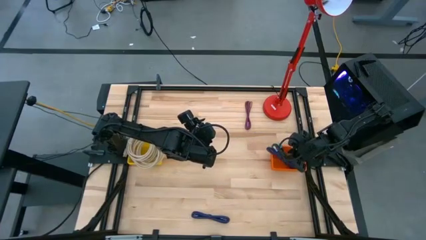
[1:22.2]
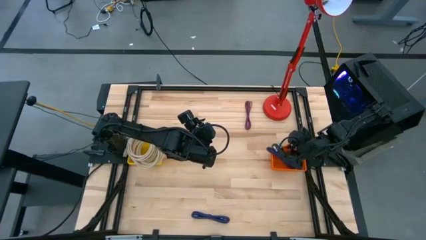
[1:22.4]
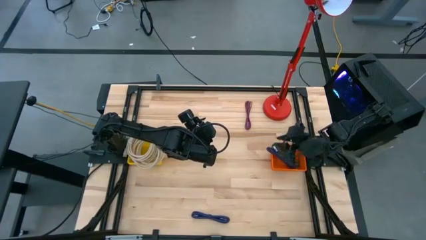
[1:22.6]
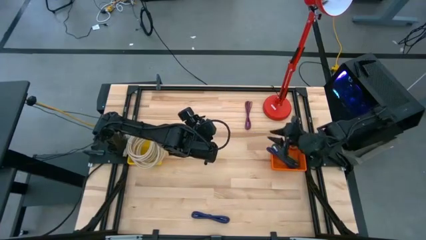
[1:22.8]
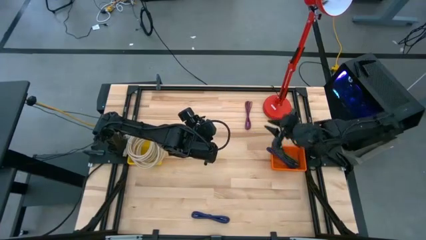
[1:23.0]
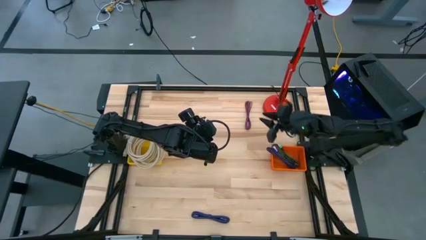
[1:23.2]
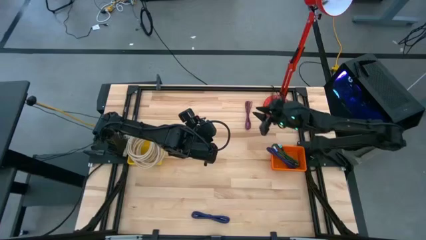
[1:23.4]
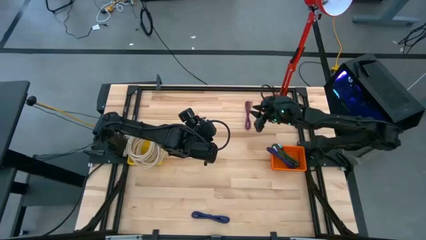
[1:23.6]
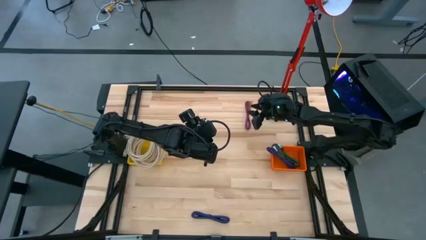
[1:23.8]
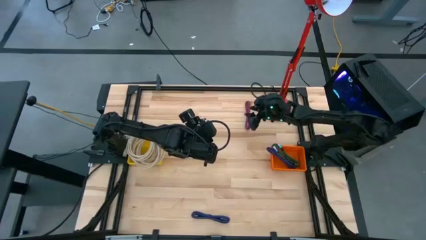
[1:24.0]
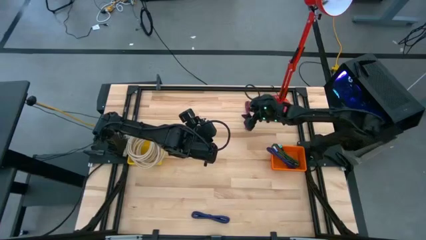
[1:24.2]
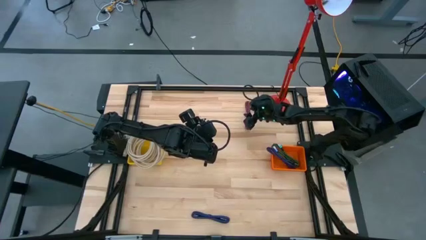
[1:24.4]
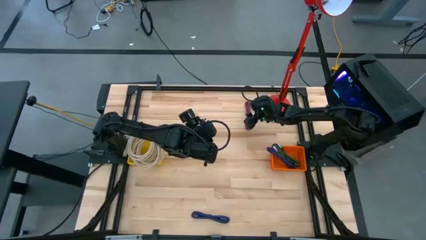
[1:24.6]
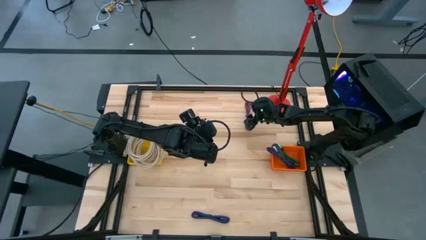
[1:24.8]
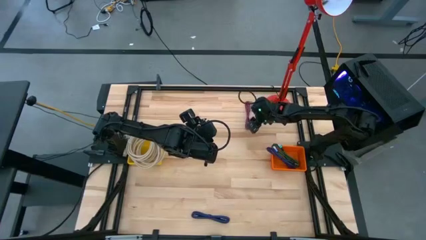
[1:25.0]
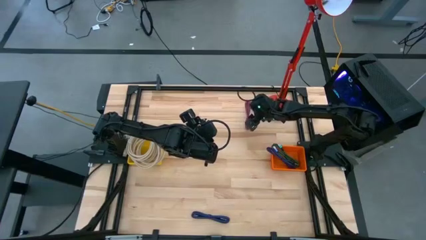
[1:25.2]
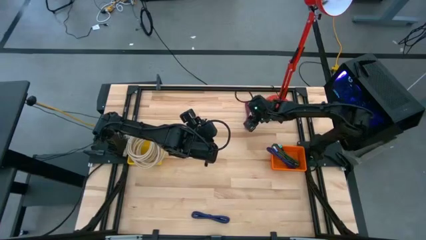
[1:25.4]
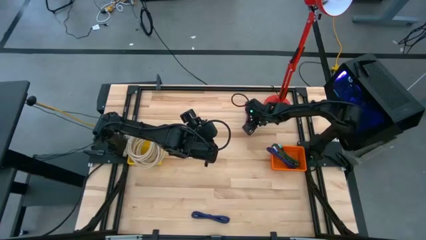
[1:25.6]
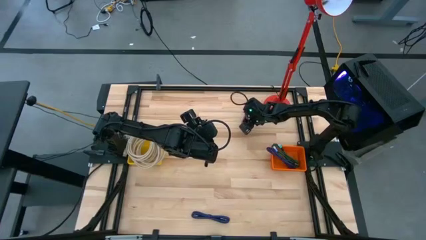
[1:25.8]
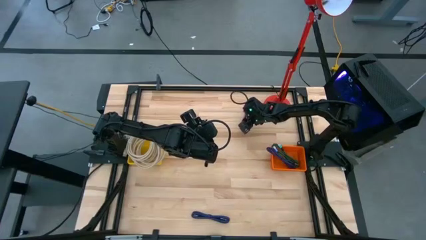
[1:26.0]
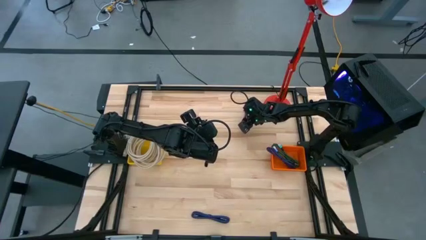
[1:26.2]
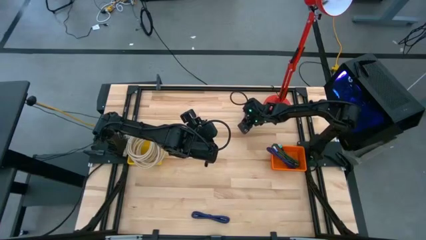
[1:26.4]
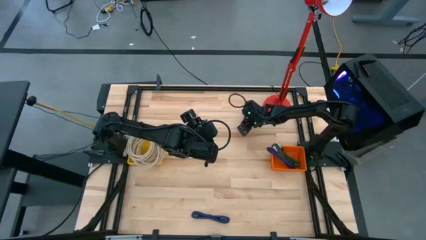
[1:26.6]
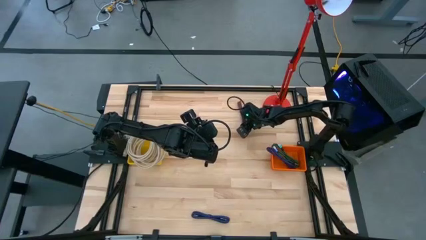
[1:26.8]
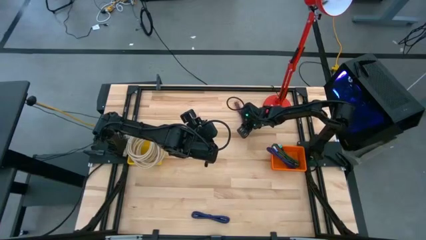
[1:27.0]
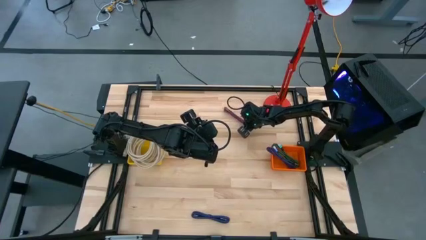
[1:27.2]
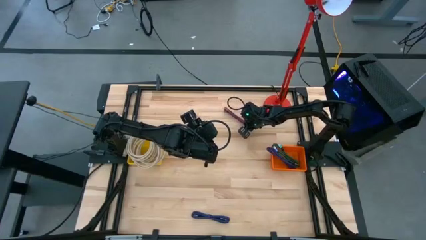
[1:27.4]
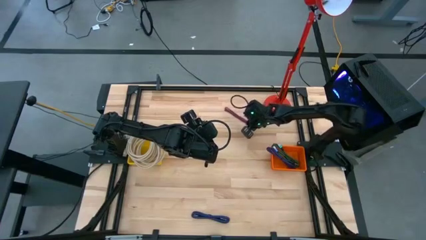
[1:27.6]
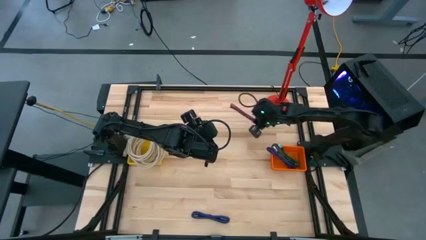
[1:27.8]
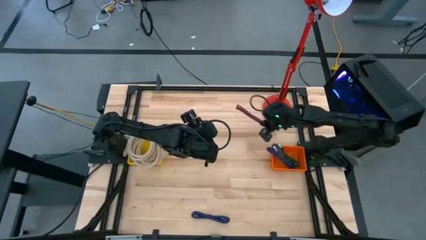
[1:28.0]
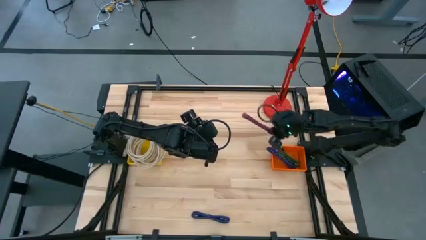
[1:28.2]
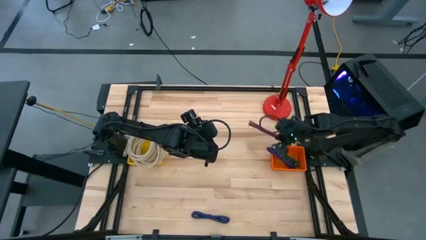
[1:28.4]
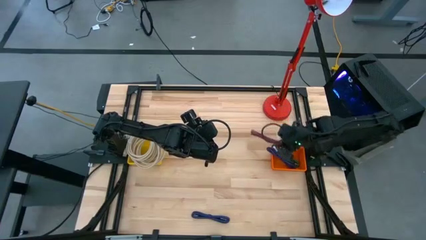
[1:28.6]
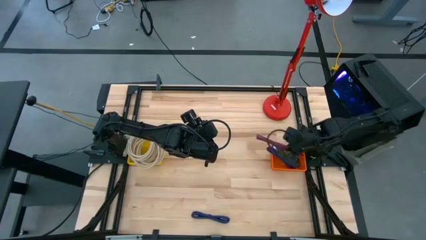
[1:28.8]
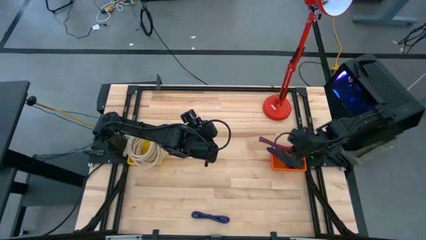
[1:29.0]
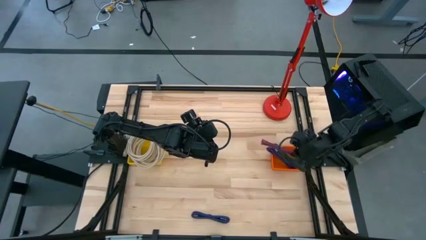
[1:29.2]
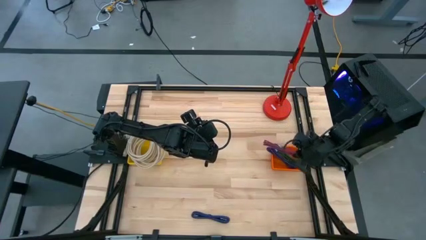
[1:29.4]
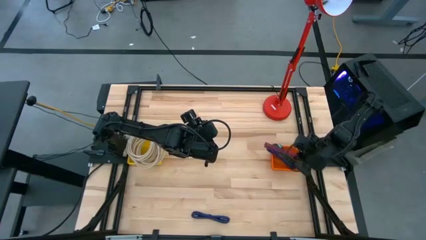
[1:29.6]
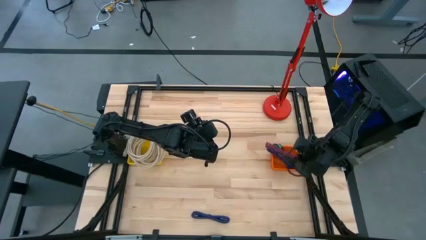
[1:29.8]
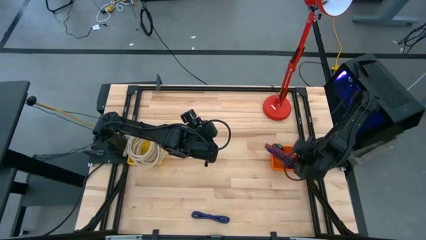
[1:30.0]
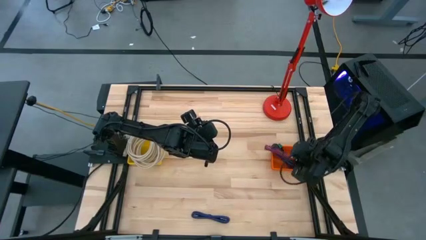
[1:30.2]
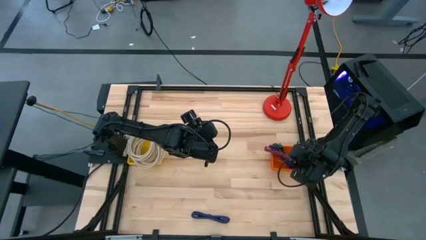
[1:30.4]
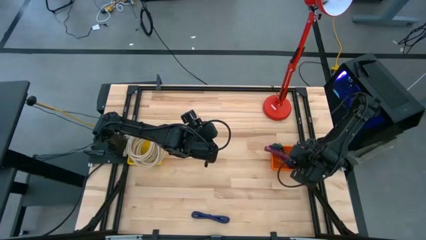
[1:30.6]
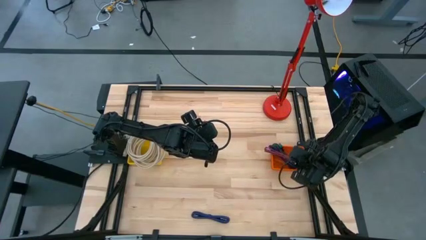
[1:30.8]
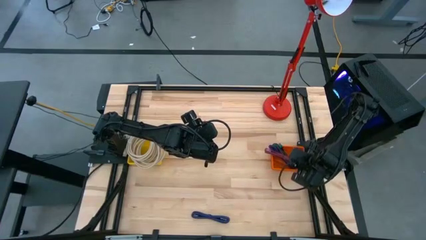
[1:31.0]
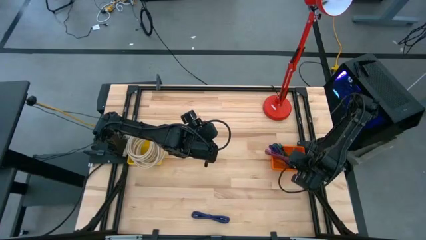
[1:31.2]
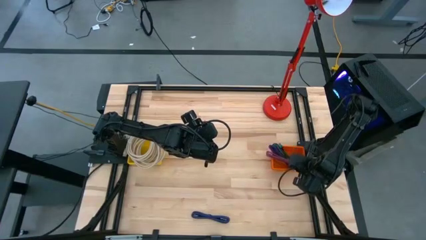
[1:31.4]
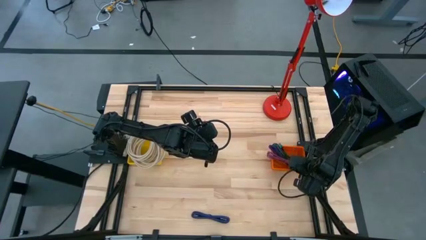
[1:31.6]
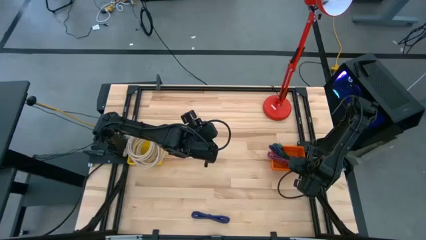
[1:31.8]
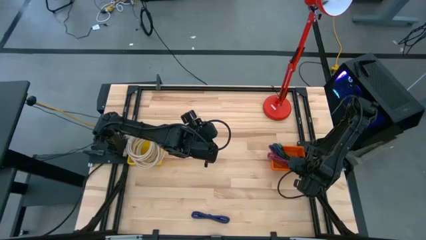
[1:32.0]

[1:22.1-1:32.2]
Task: Pick & Place USB Port
Put the red charger cable into the orange basket

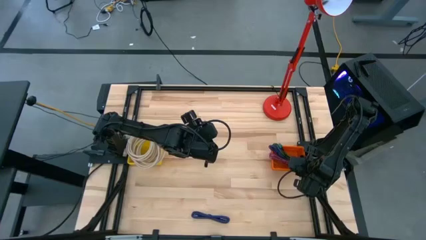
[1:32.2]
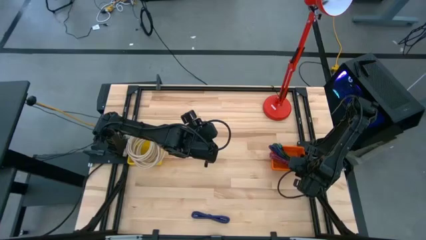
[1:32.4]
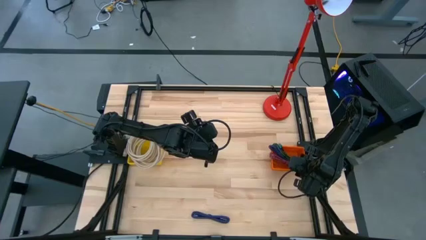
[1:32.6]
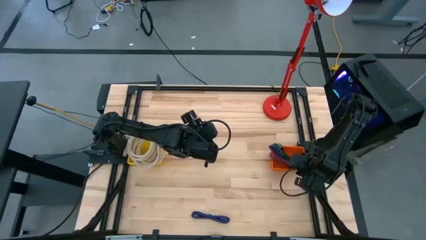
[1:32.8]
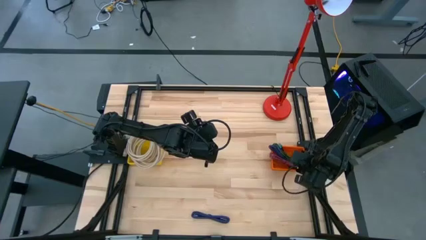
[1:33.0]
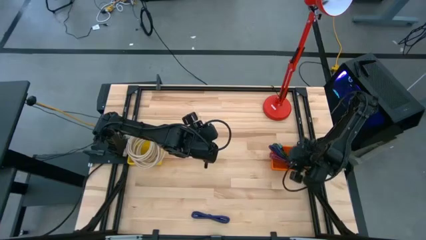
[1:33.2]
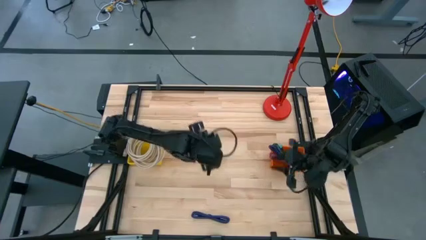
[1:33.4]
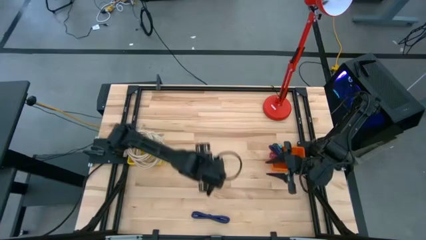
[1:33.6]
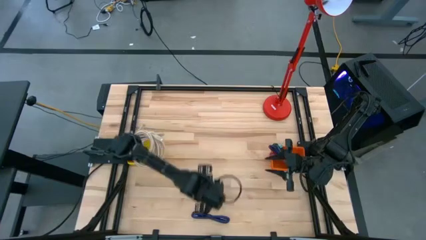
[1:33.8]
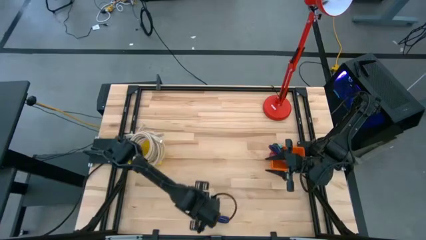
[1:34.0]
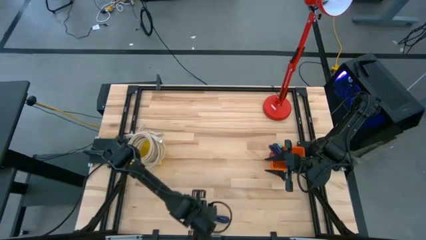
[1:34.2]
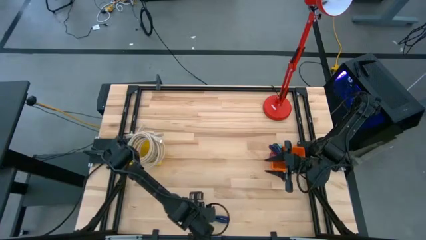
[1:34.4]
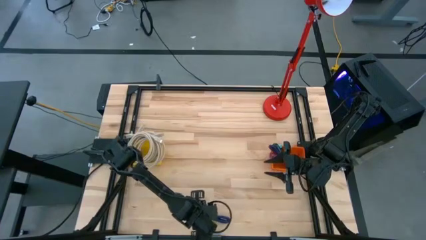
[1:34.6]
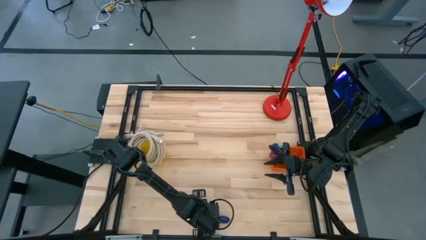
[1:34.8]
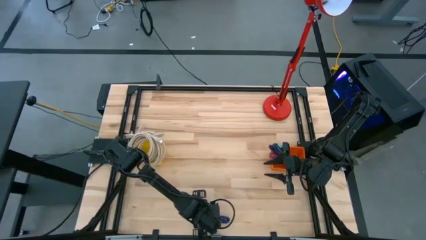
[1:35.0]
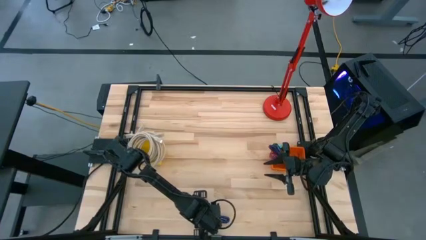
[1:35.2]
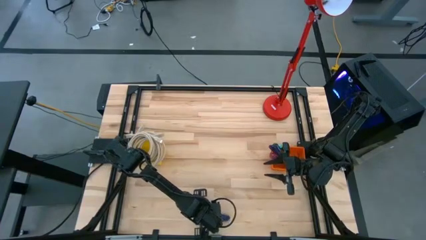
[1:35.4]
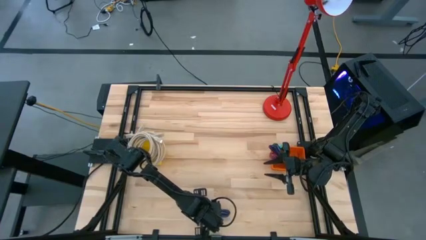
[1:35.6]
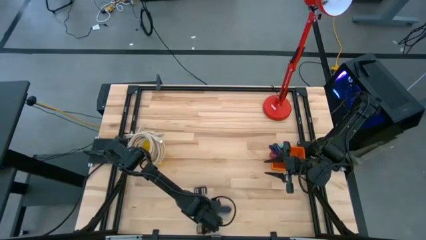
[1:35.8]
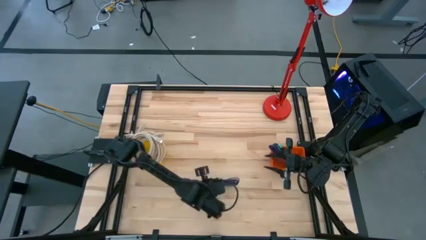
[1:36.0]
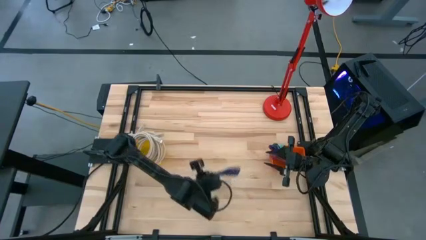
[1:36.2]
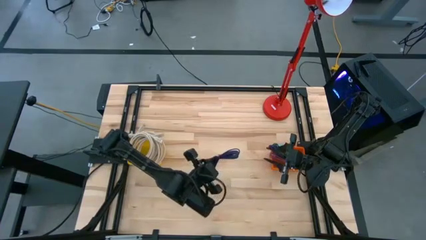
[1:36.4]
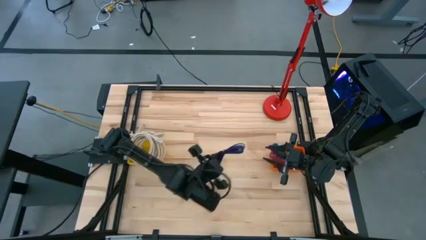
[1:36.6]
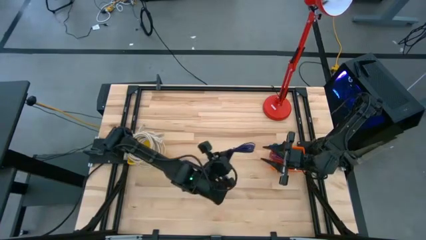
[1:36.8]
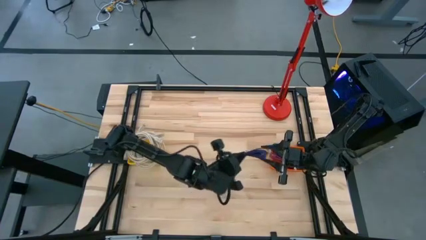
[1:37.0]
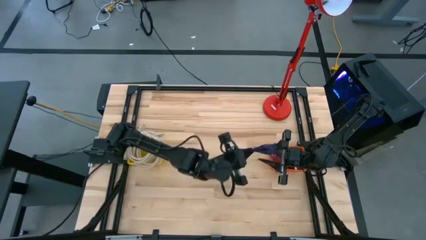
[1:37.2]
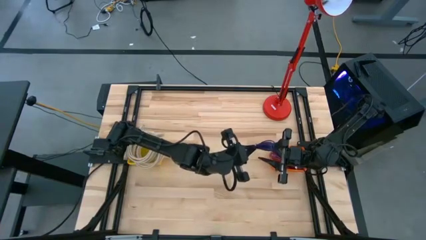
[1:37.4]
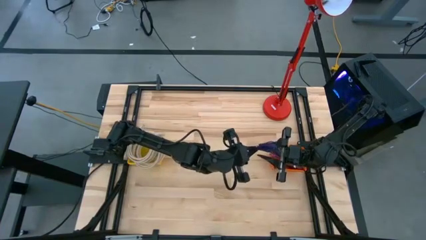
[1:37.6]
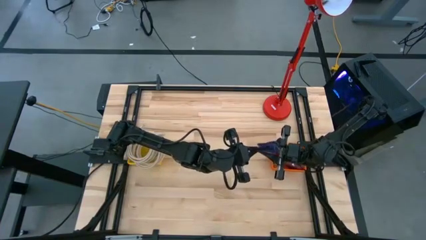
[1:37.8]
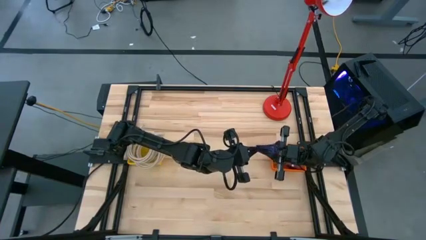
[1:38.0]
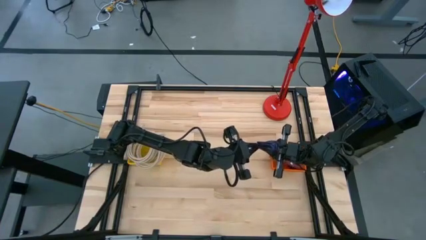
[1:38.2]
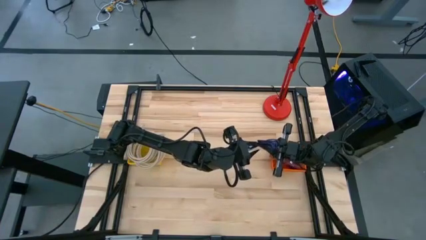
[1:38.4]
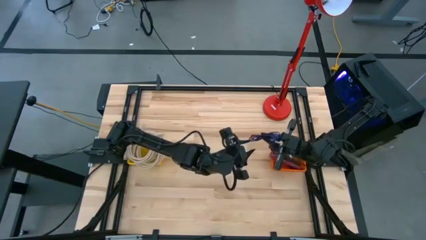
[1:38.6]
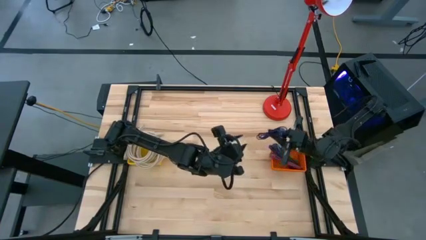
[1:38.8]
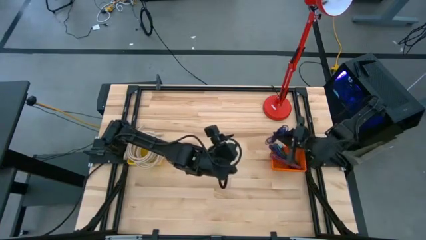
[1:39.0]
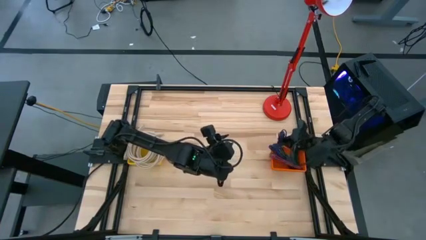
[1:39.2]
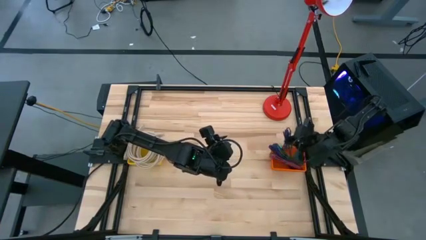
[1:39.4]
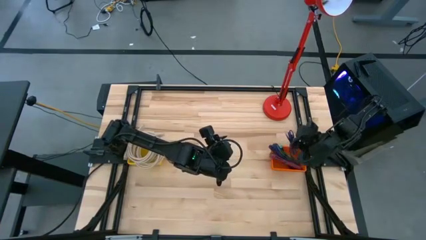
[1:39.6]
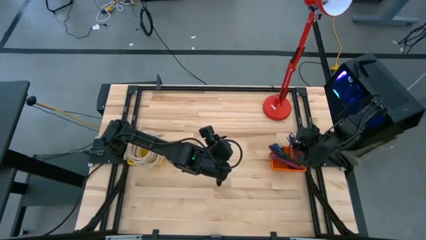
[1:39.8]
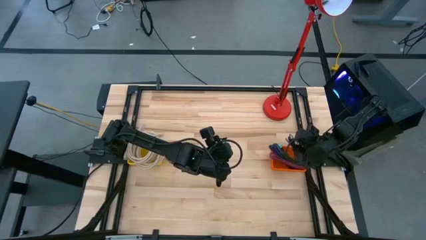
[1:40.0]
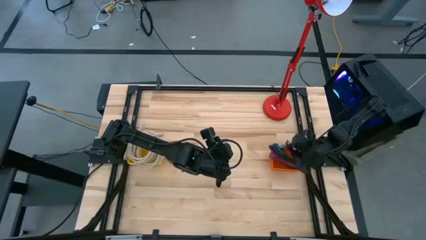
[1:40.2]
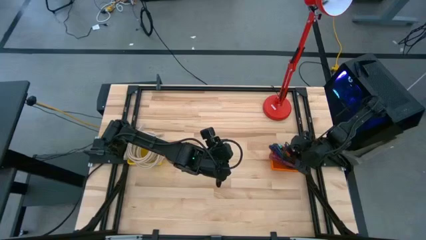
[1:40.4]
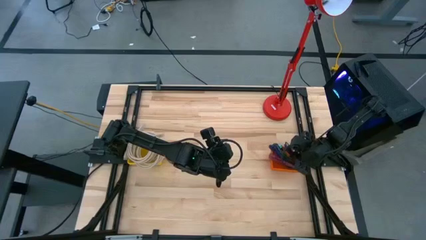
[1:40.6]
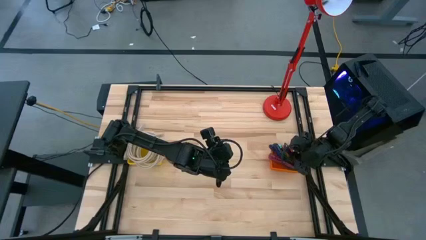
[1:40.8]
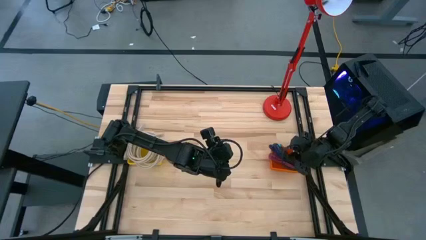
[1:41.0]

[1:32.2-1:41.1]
Put the blue charger cable into the orange basket
